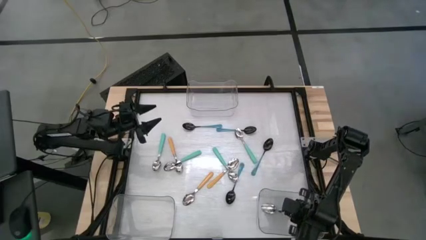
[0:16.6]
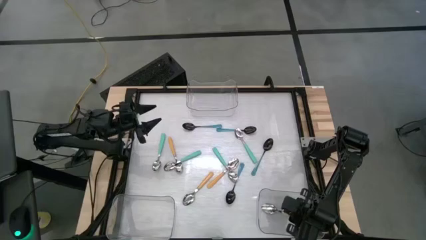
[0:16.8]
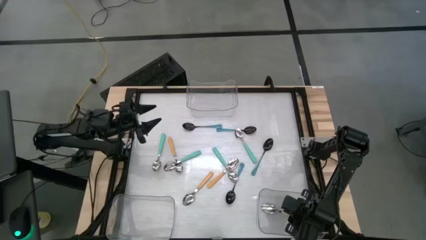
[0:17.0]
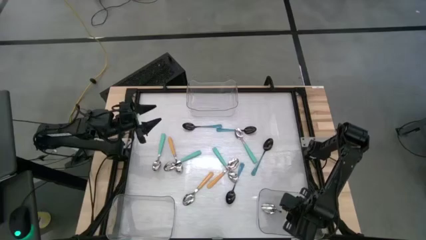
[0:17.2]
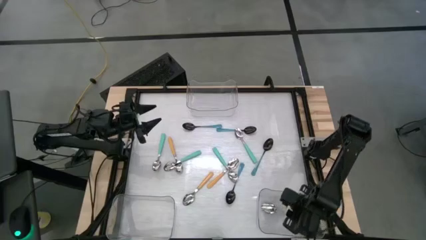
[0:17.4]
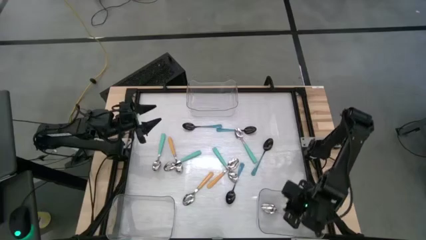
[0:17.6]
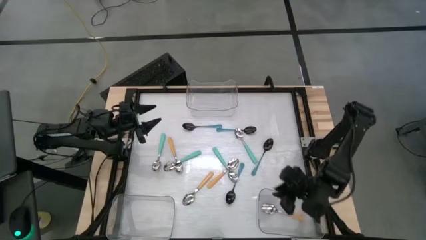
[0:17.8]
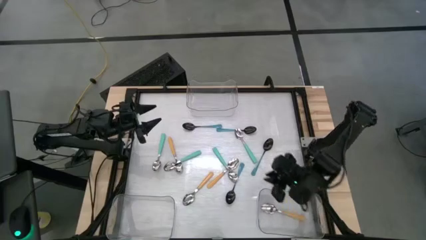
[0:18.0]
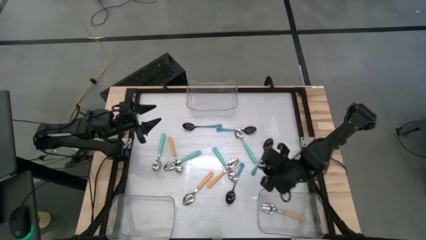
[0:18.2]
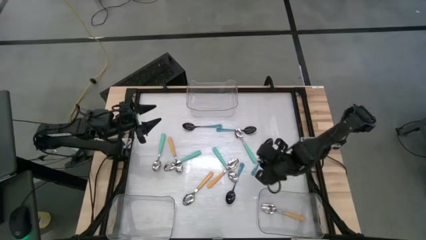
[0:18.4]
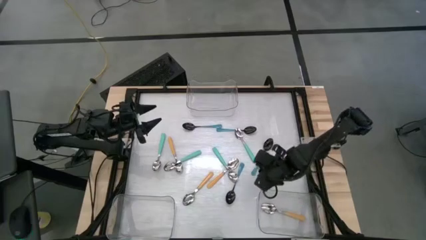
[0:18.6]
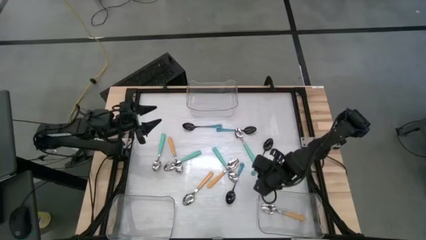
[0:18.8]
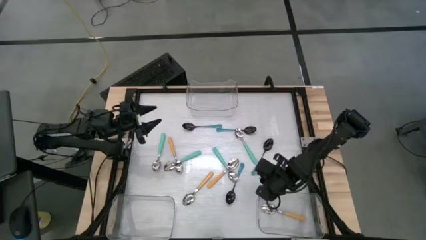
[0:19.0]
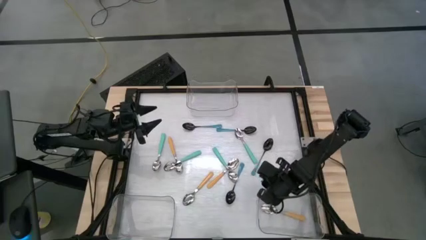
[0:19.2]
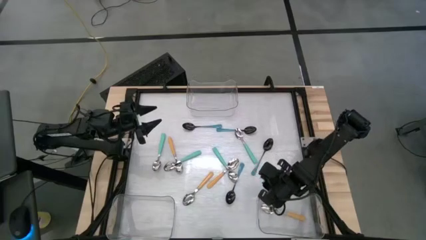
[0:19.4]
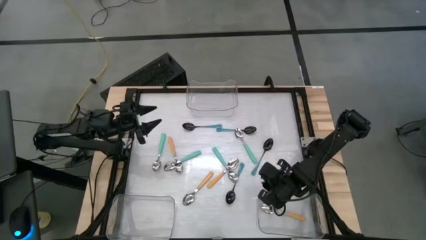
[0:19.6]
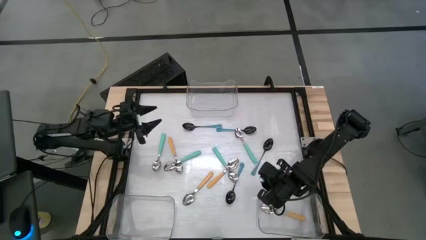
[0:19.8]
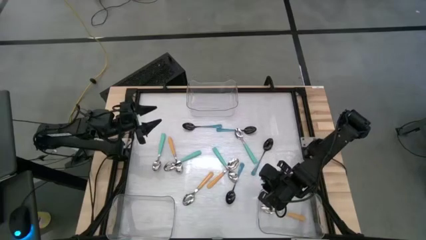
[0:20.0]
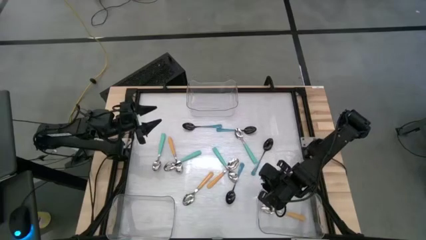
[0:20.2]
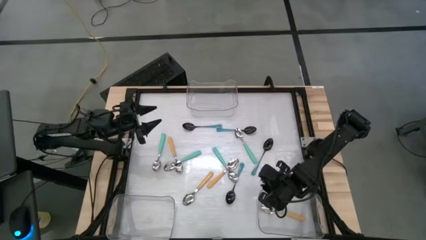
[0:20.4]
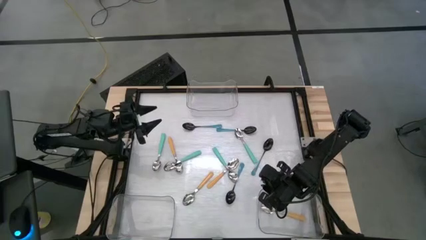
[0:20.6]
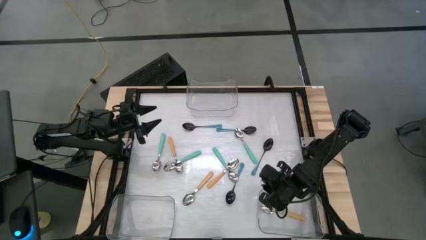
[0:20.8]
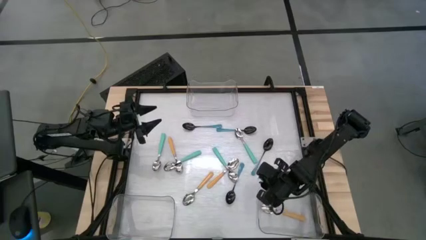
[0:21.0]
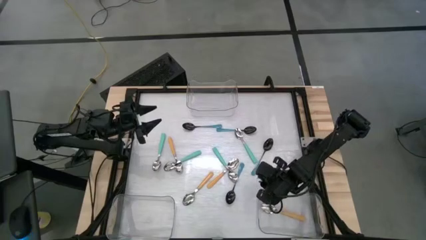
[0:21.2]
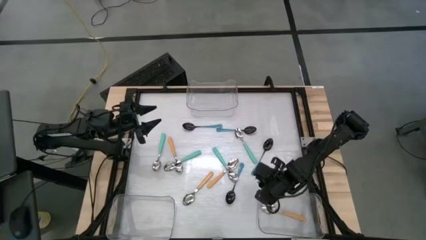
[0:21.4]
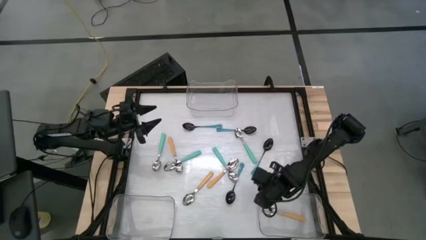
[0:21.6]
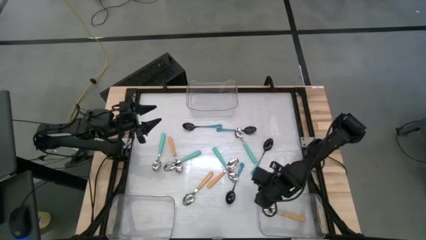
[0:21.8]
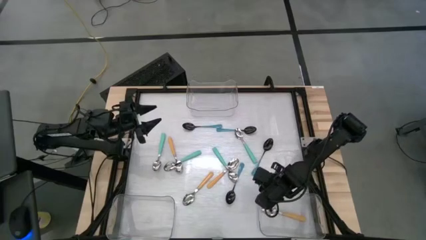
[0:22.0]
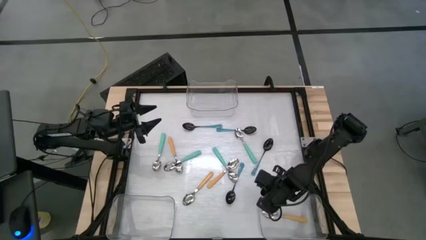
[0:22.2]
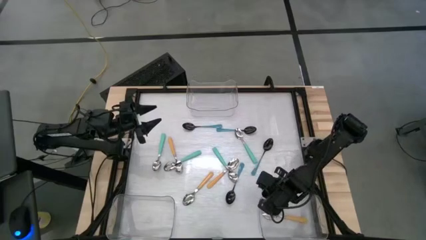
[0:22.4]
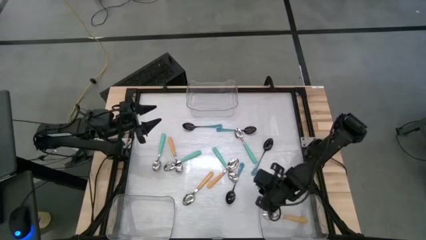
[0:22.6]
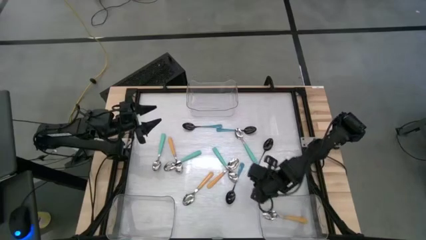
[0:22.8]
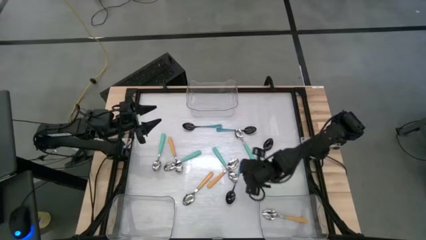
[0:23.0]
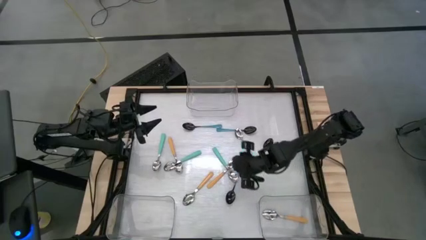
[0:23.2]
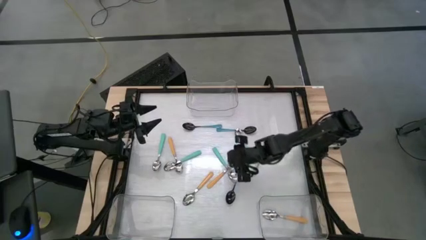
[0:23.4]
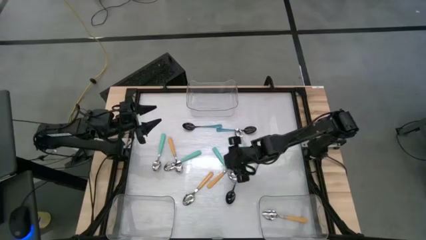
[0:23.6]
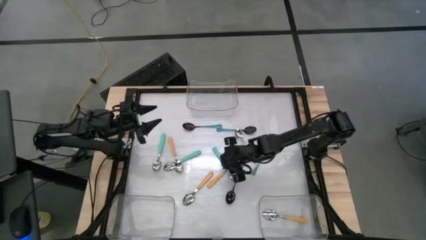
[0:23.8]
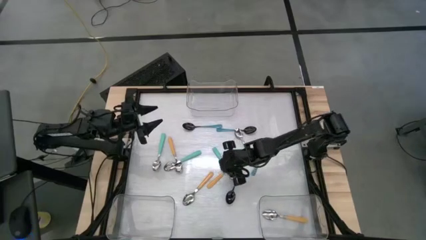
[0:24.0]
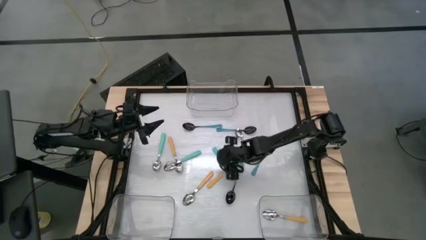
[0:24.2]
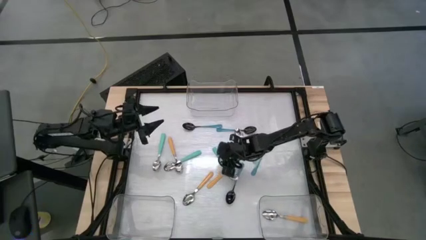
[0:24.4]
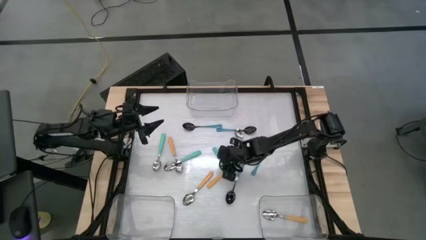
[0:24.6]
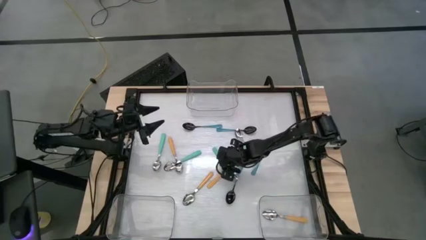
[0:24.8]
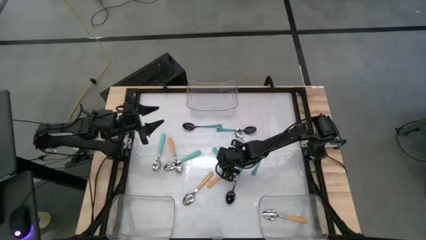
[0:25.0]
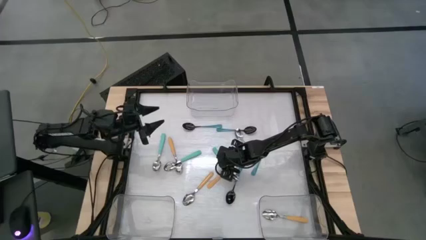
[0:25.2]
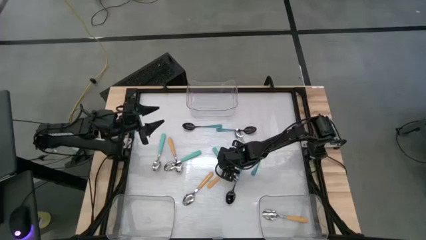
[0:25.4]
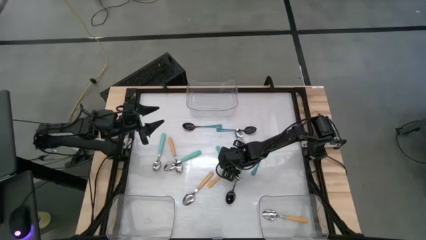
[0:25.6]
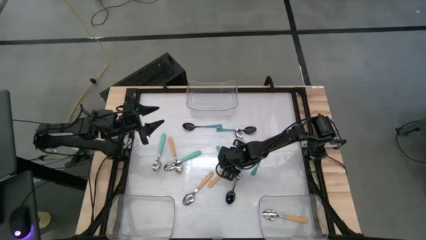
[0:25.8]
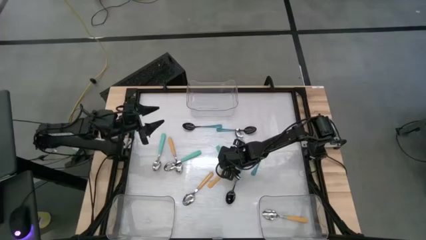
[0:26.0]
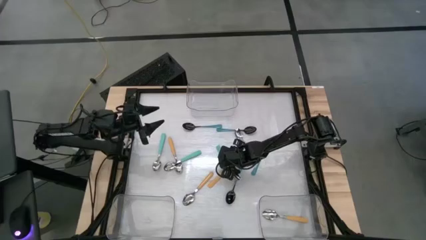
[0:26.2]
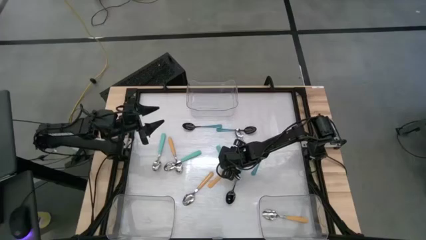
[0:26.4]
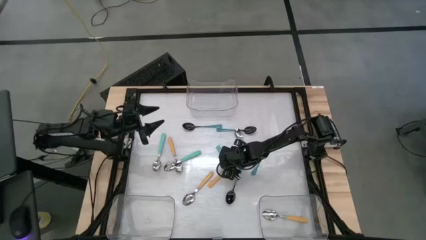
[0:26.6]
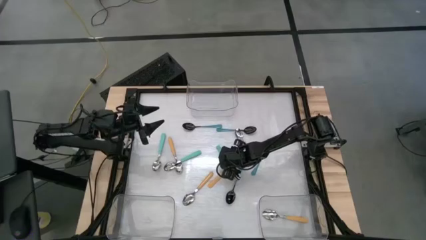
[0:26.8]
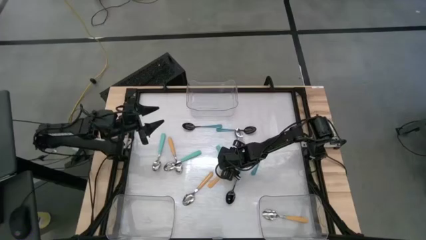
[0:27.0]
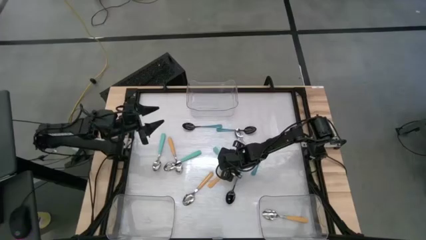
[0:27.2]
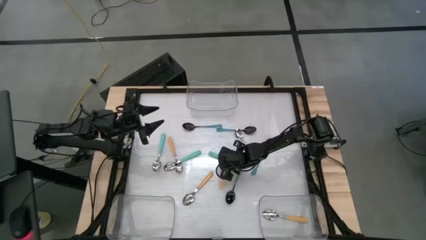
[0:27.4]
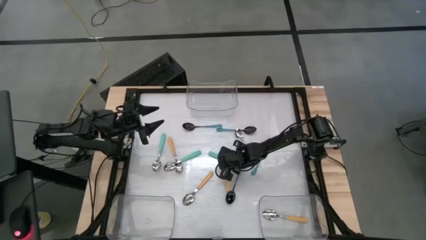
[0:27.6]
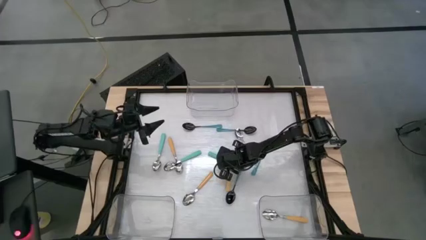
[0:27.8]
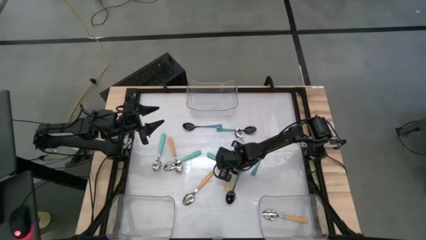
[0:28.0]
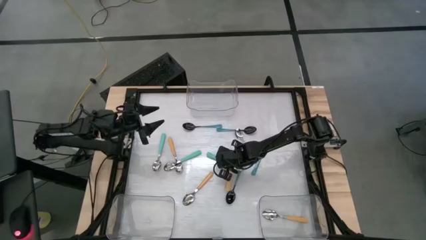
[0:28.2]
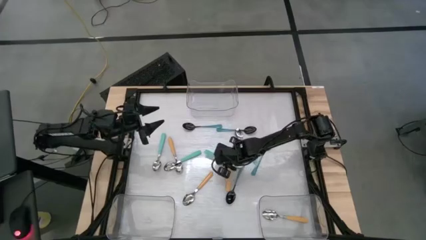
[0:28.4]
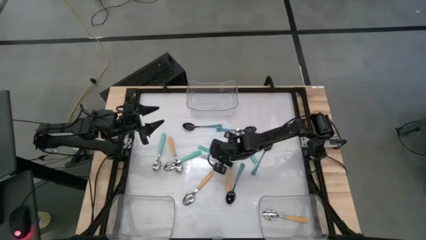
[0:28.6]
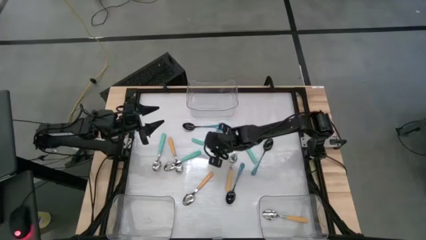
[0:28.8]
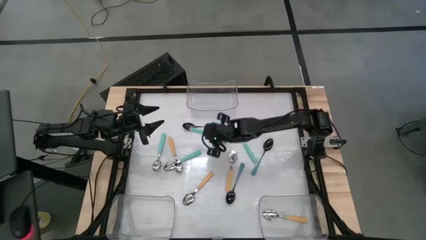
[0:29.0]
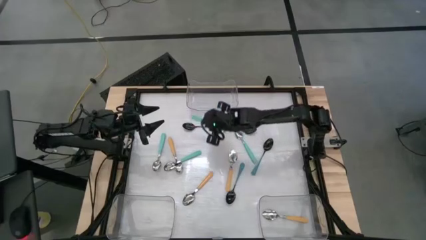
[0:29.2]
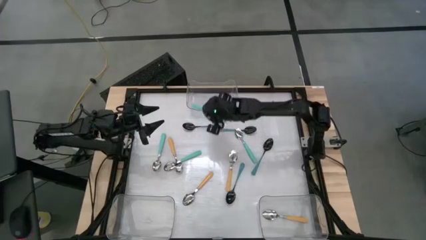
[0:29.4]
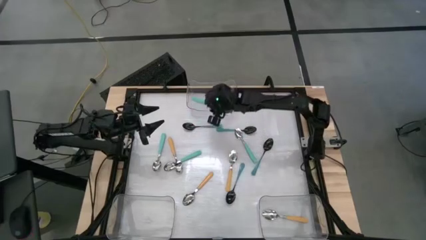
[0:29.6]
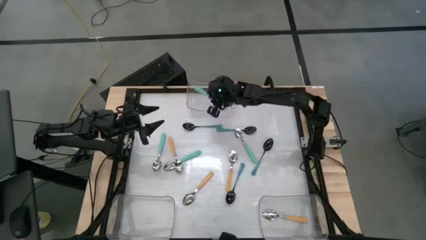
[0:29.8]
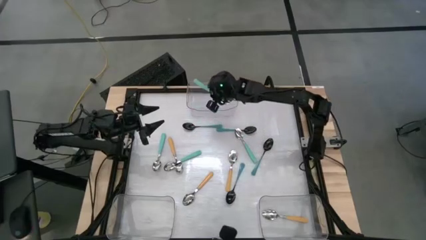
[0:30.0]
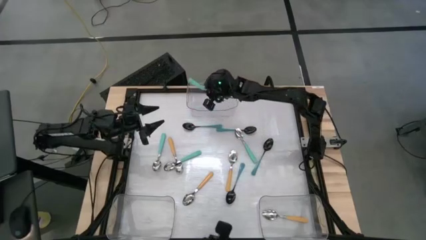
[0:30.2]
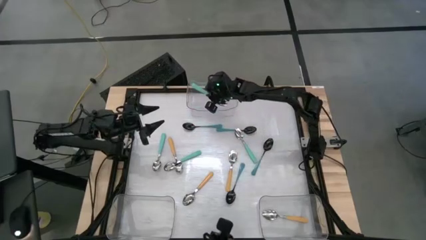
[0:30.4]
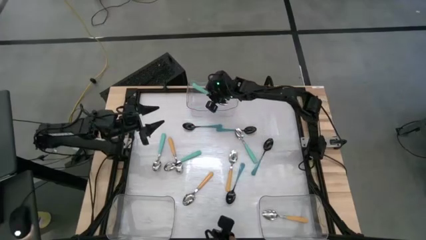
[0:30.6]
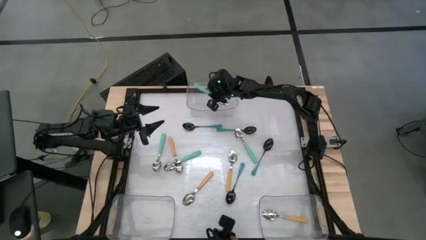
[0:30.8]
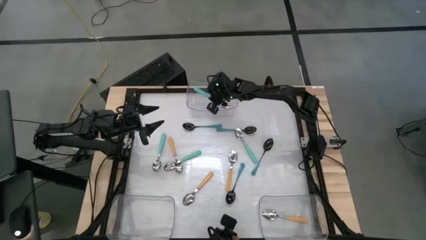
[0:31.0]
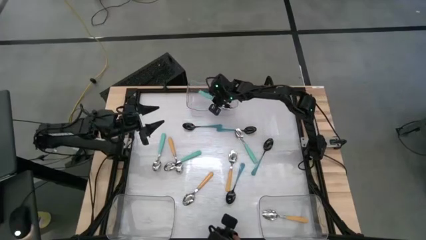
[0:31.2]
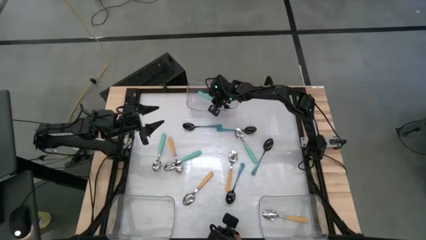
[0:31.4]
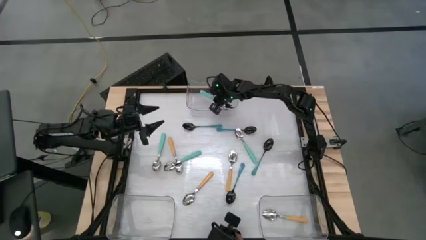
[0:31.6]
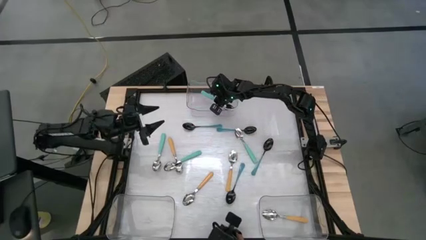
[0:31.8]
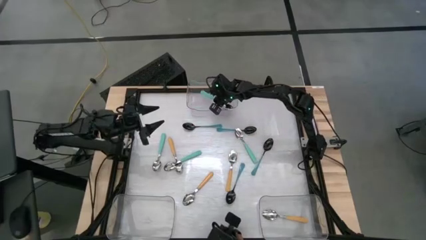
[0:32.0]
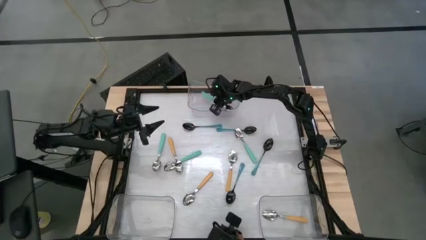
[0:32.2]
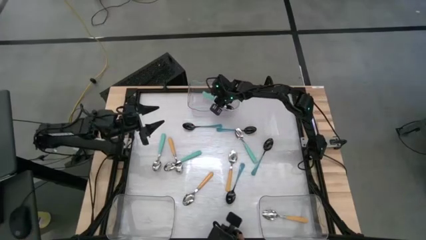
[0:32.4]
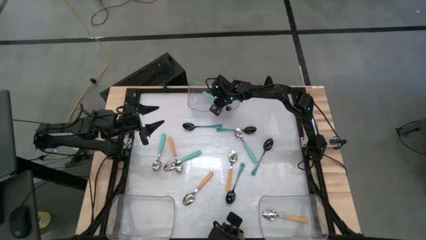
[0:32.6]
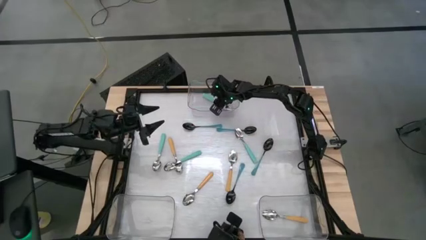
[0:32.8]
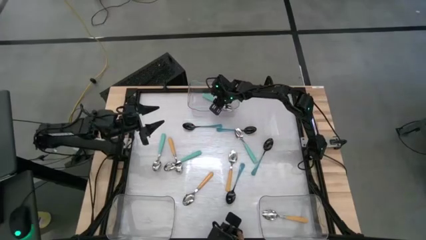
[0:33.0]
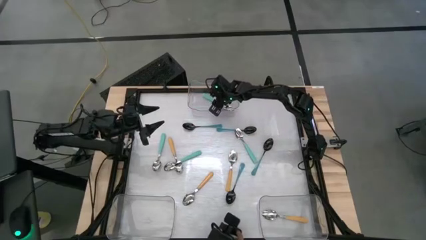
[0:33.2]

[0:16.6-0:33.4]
Task: Sort silverware by color (type)
Put the middle right blue spoon into the top transparent bin
